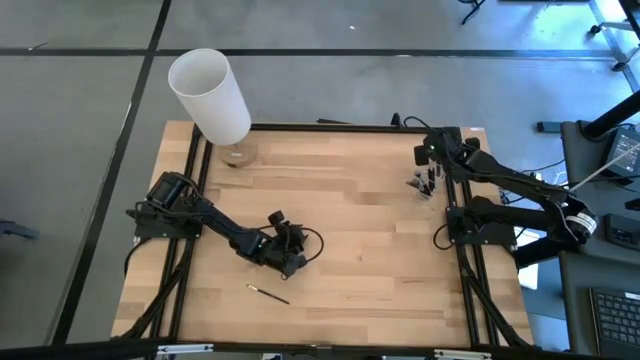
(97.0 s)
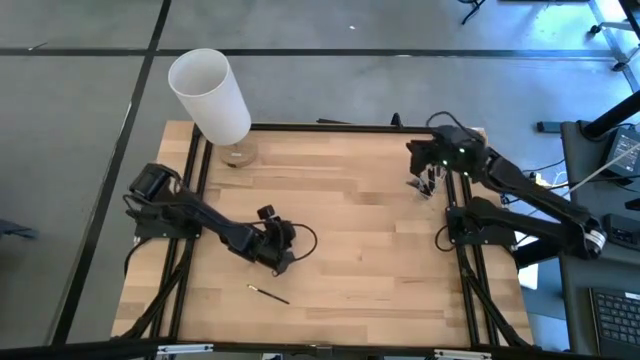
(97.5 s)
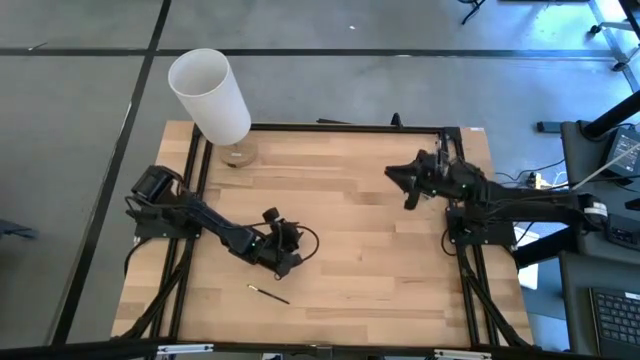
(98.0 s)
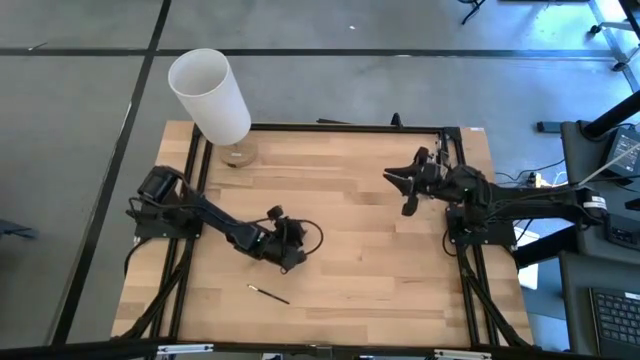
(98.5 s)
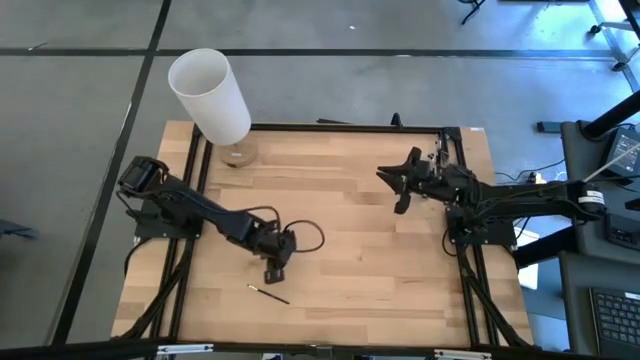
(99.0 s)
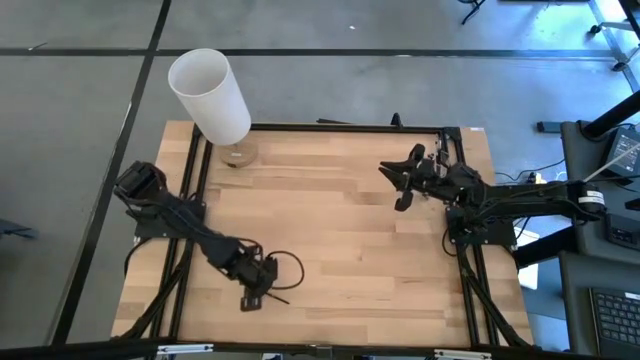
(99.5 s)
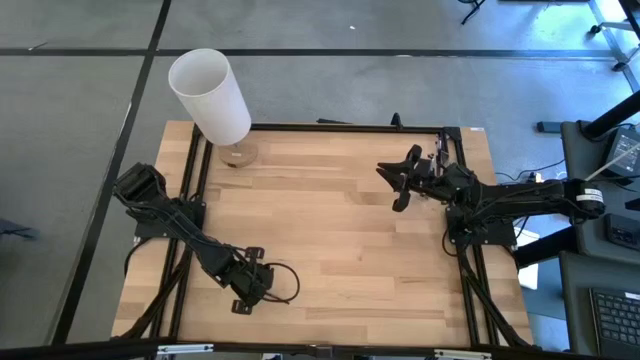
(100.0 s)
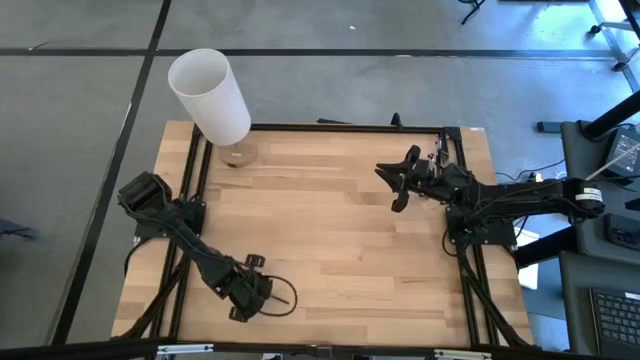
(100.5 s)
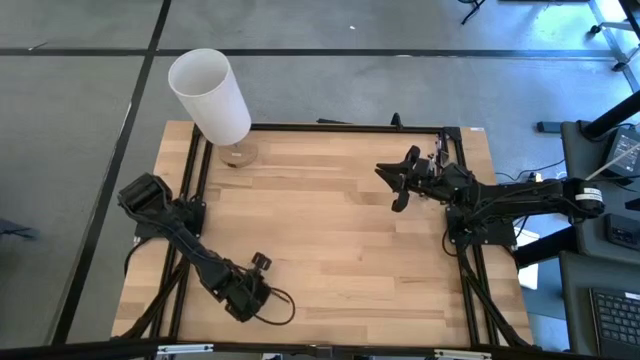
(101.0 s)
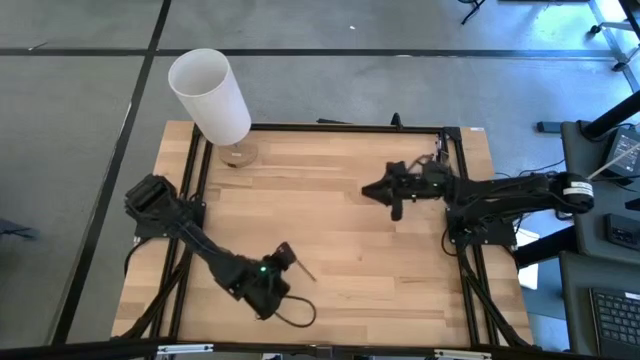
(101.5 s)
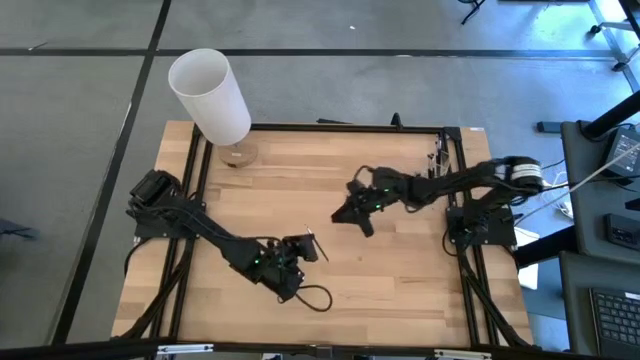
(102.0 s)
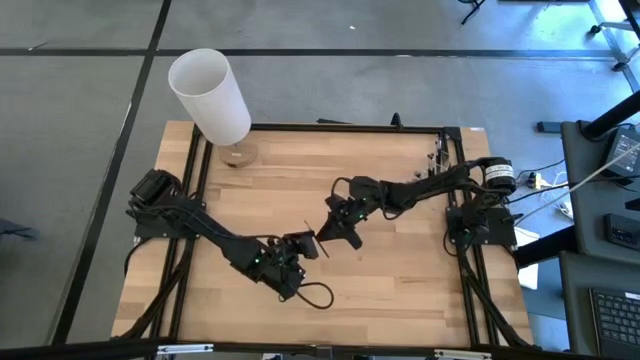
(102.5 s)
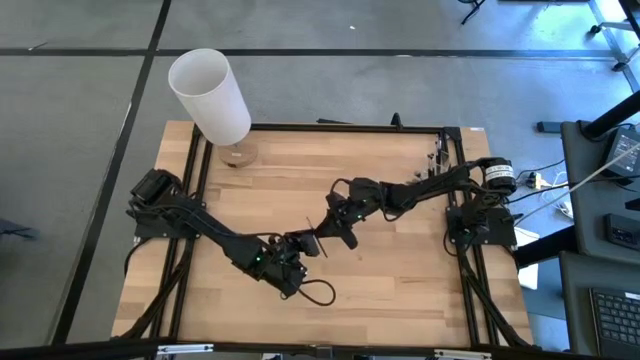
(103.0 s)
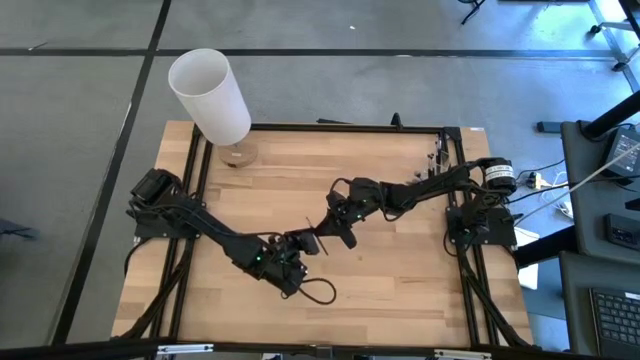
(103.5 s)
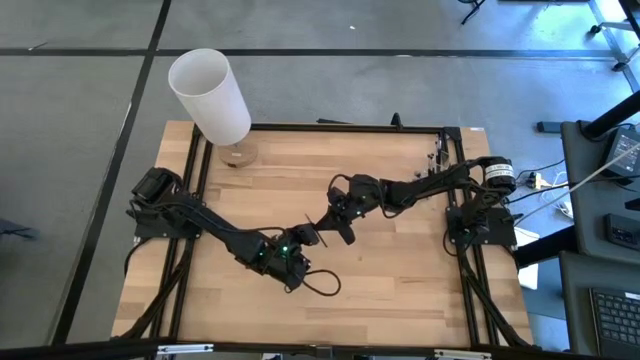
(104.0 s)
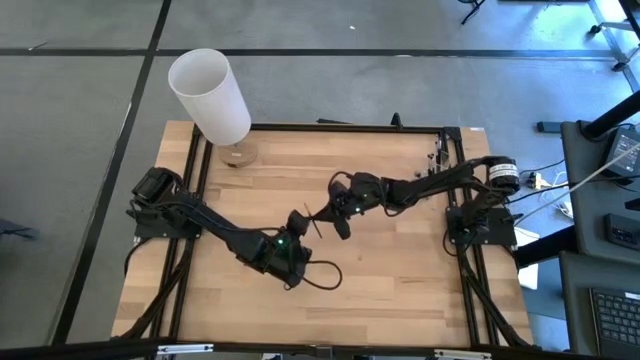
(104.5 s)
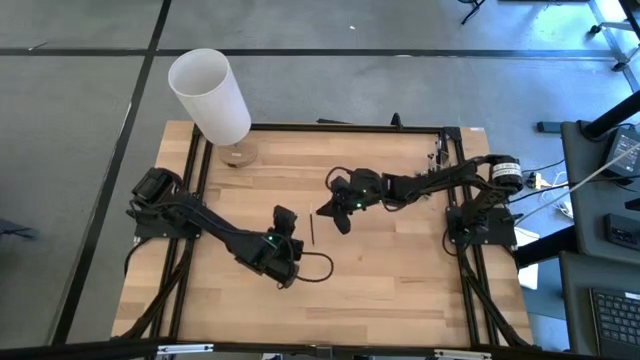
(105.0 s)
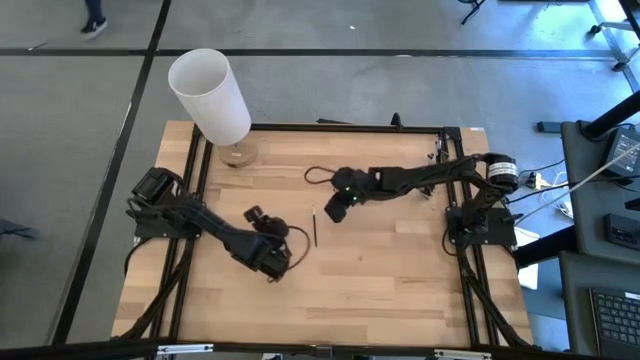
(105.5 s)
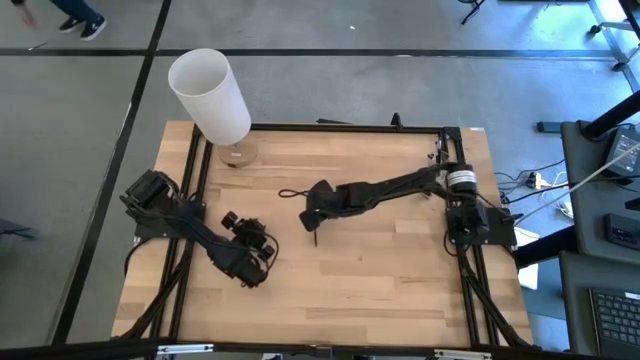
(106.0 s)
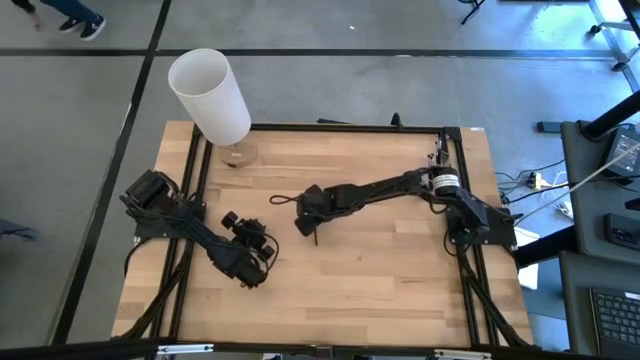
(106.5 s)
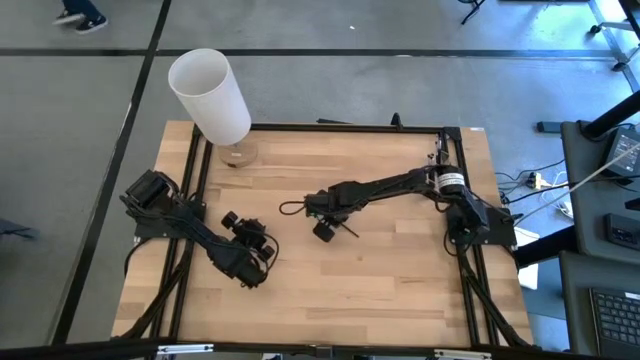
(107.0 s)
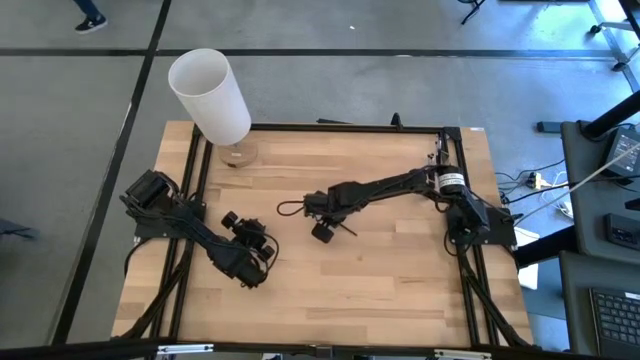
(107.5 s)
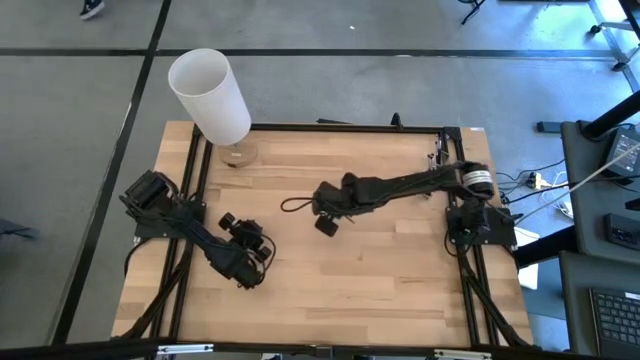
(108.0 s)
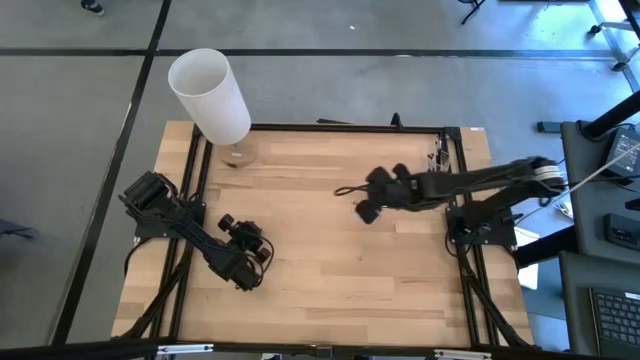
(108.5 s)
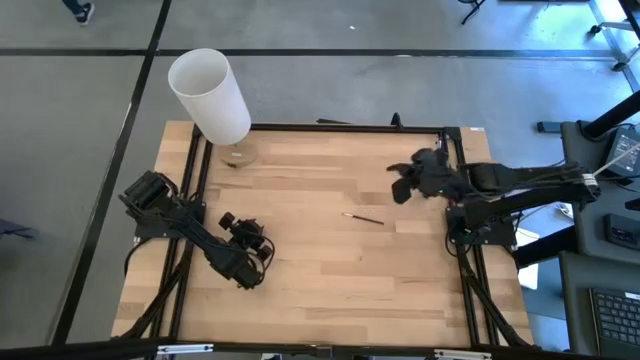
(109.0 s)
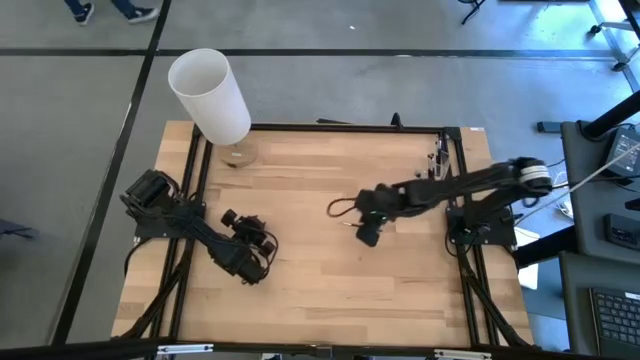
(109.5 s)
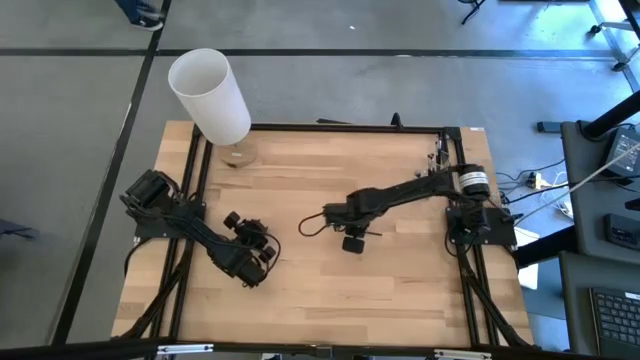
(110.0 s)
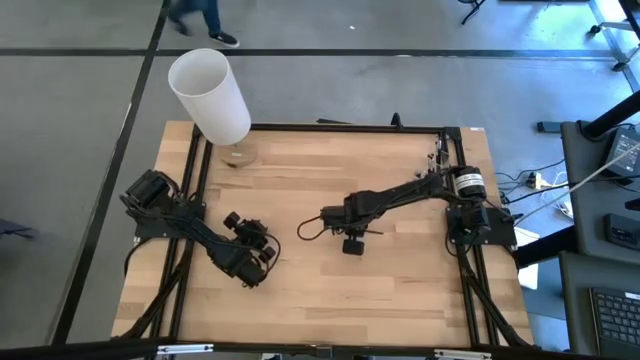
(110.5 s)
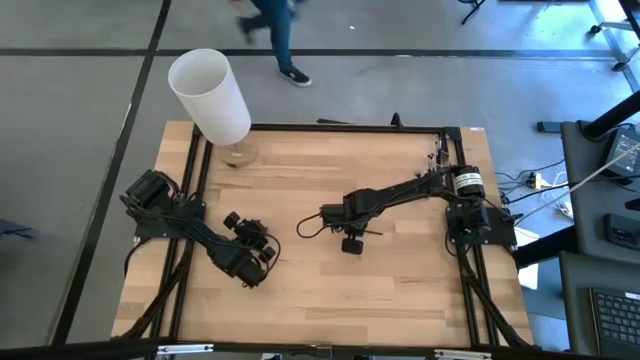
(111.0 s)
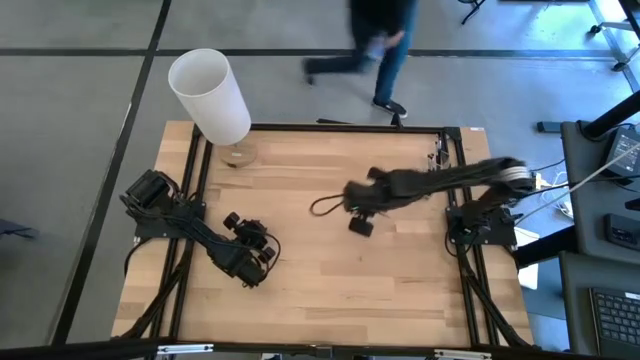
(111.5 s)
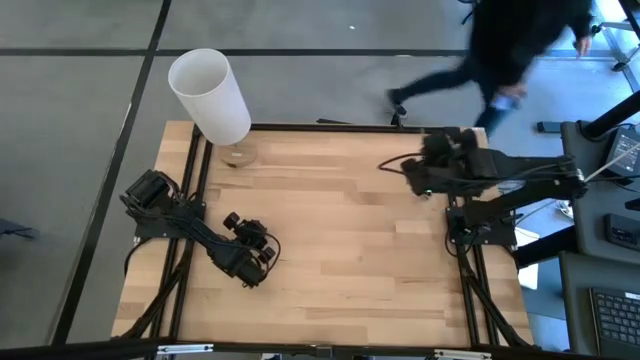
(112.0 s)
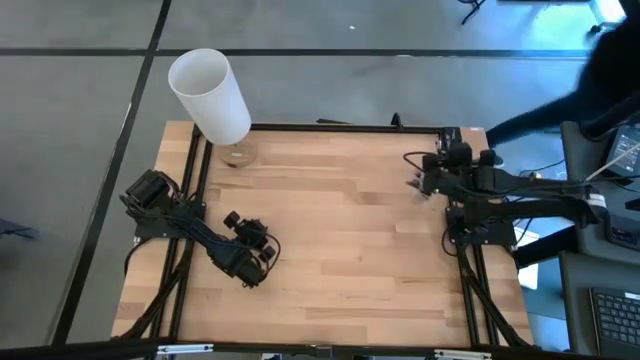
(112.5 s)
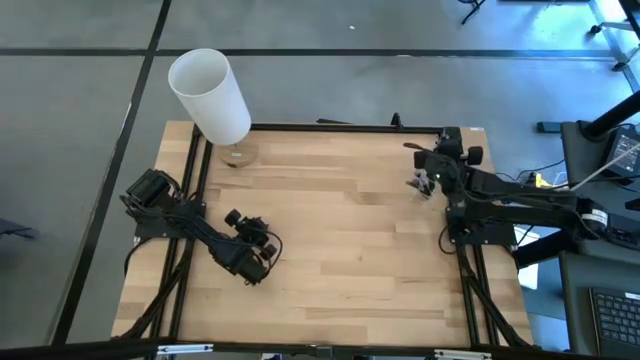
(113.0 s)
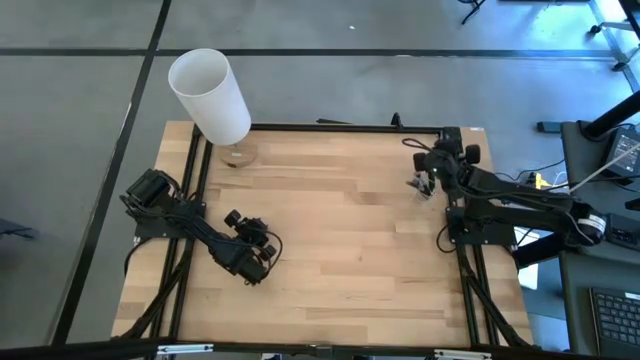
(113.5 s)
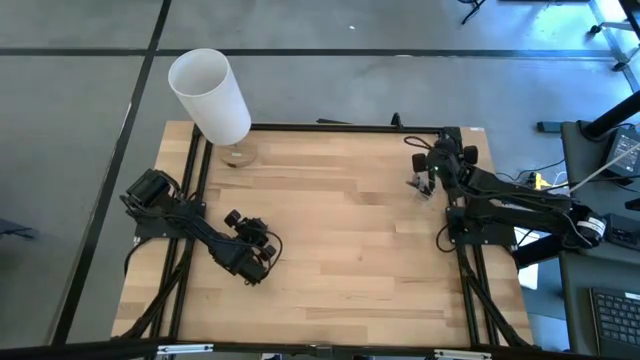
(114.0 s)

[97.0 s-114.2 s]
Task: Sort items
Put the lip brush into the top section of the transparent organizer

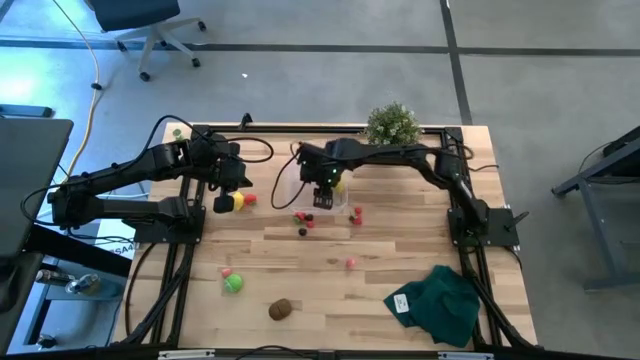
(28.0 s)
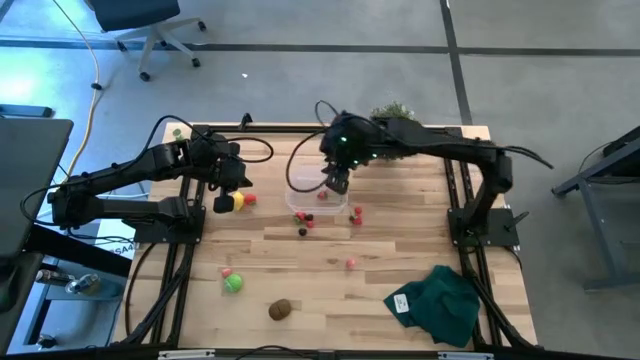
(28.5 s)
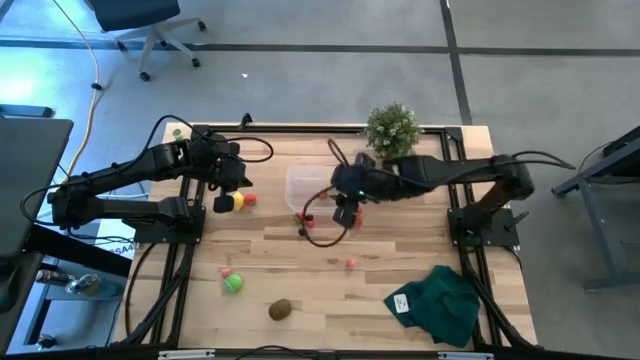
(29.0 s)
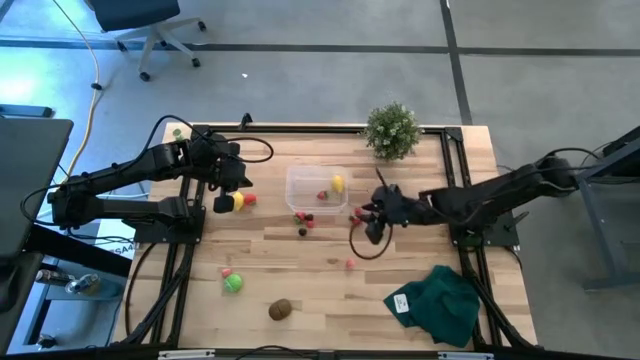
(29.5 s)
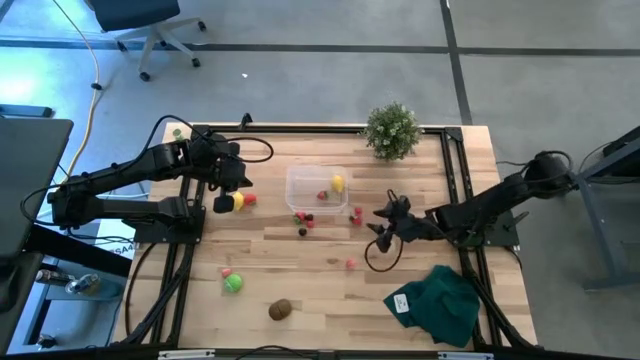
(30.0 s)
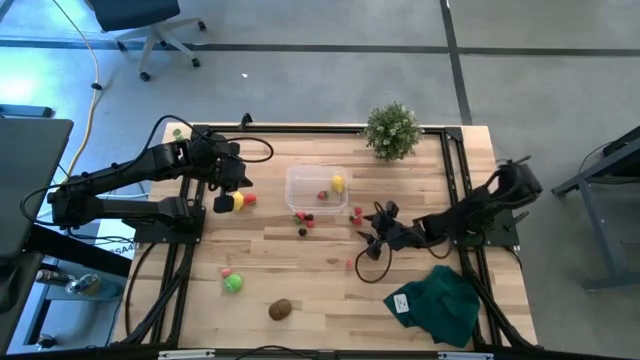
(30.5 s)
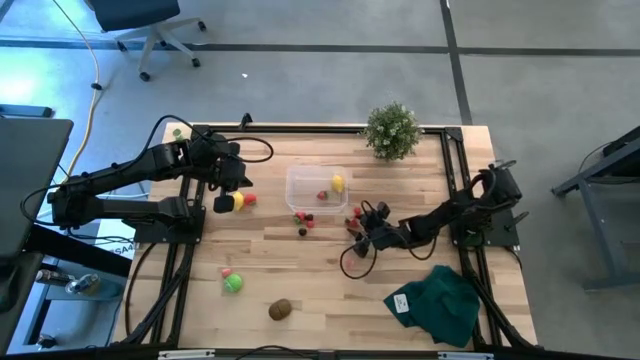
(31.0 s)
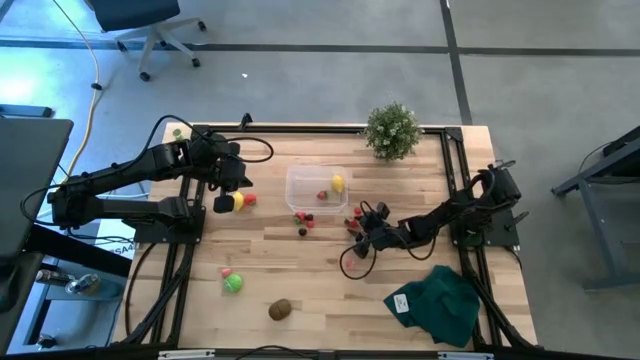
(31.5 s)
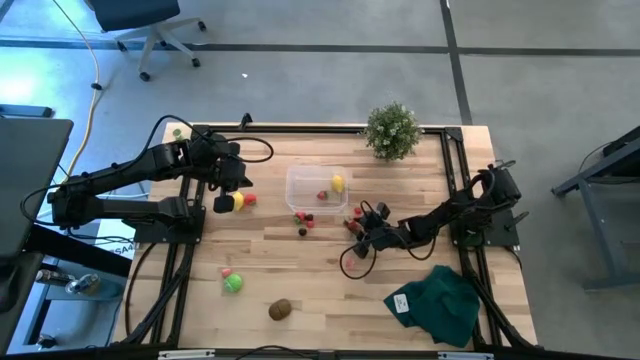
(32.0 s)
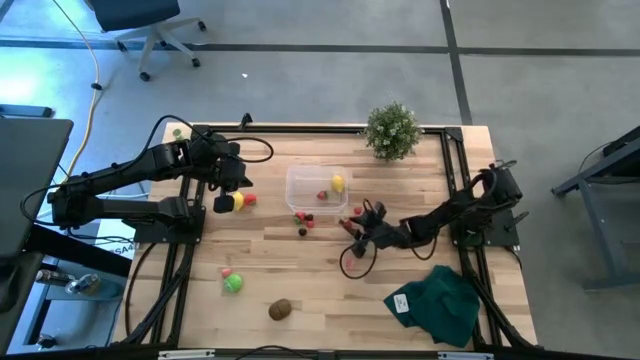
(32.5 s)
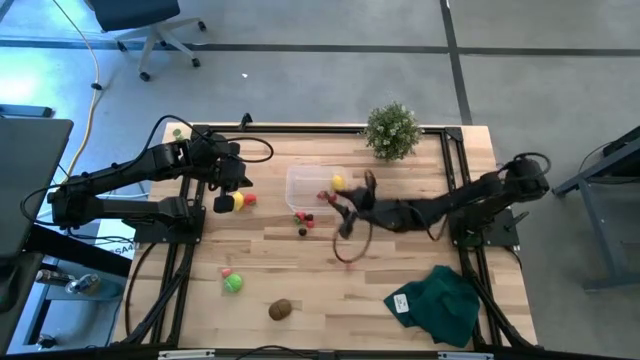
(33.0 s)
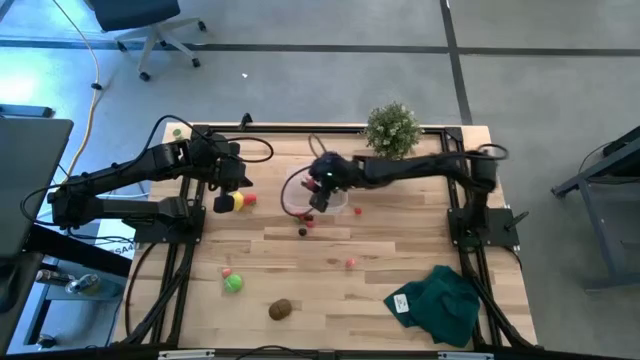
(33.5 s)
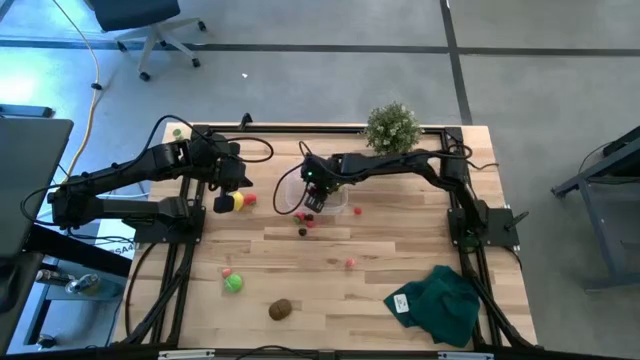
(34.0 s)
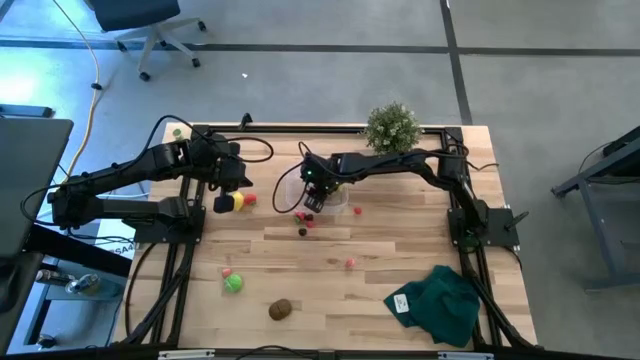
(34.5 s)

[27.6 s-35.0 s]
Task: Pick and placing Produce into tupperware
Put the red strawberry into the transparent bin
